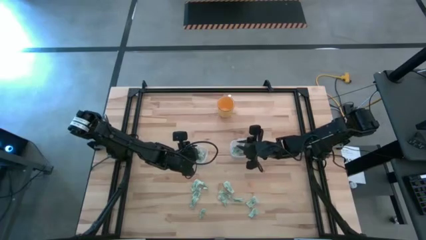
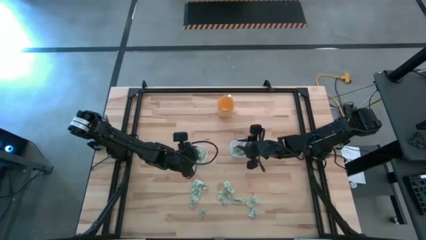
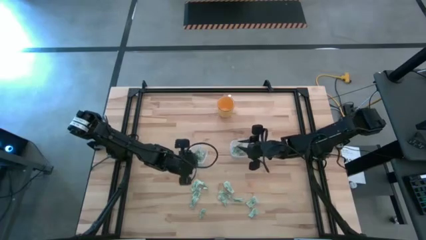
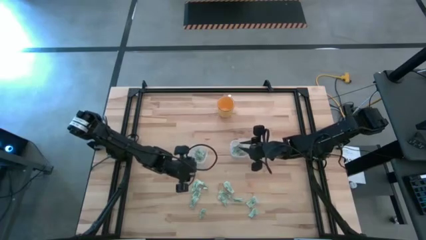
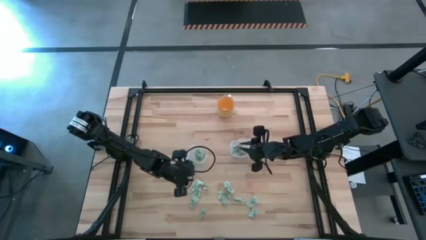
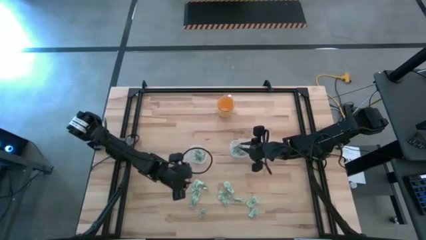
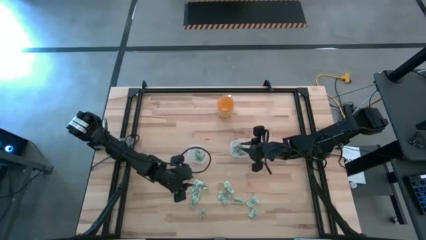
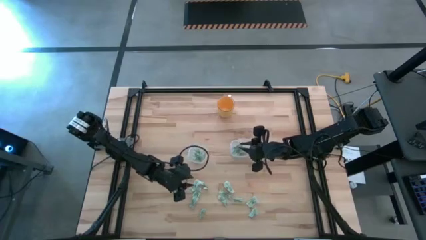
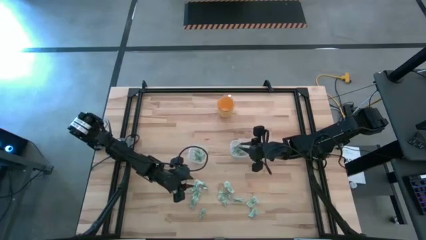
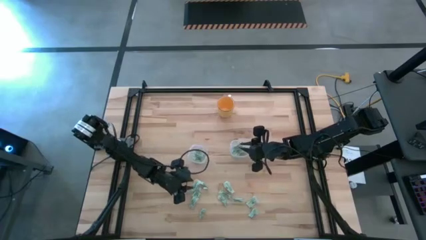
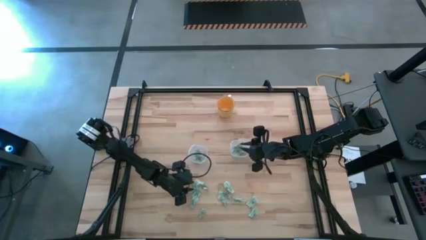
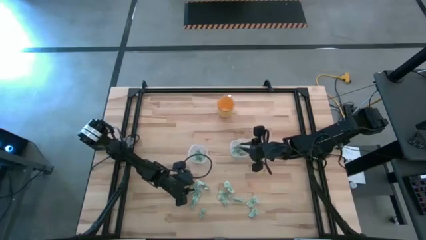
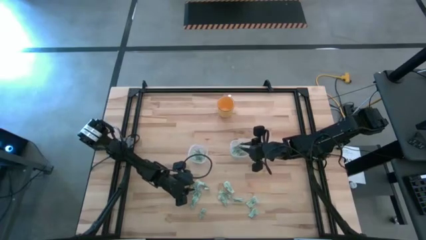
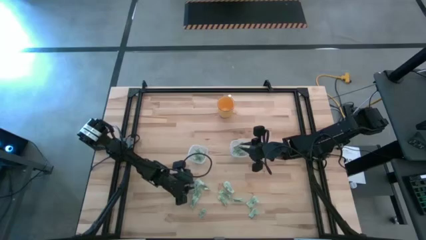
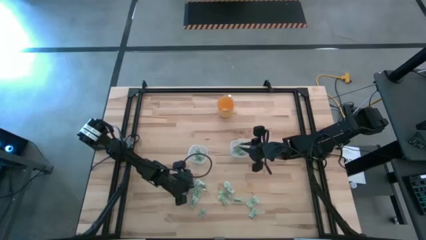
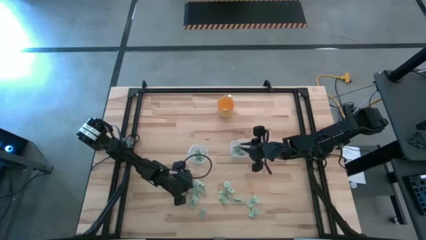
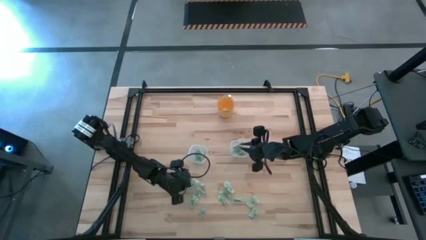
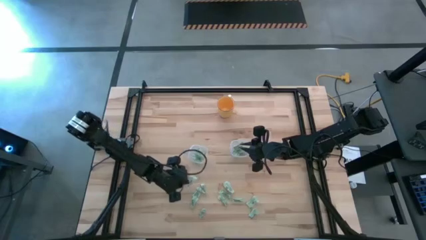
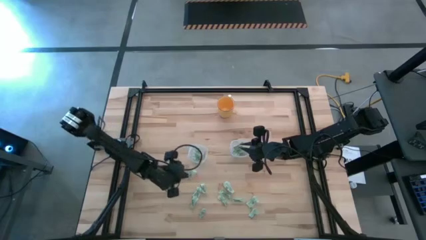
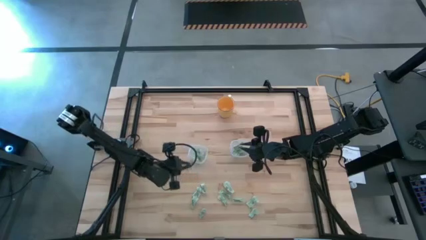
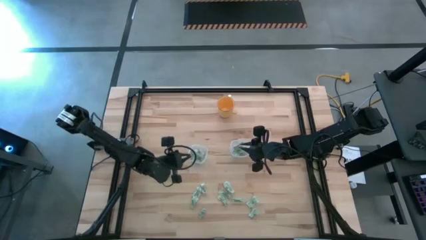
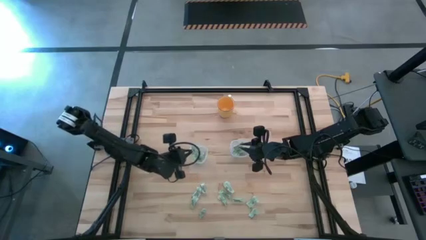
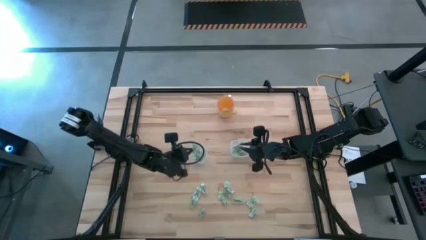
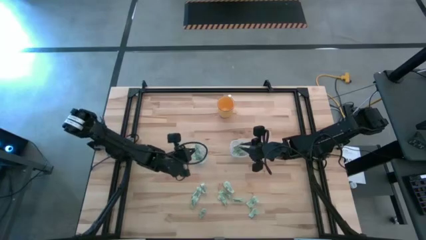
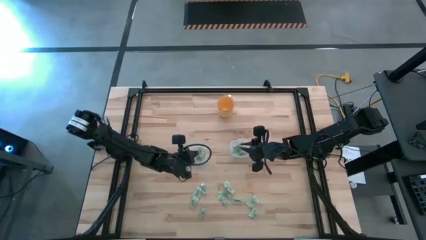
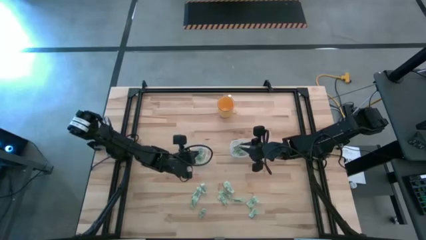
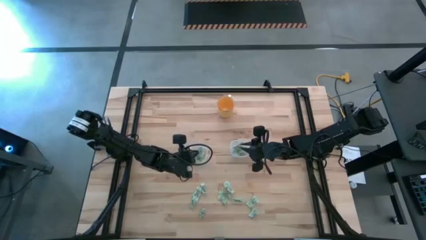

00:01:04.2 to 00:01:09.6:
Task: Pick and place items into bin
Put the green sweetener bag into the left transparent food container

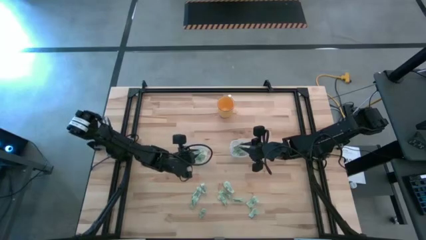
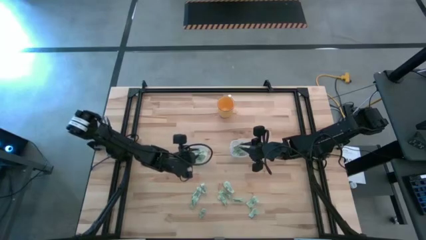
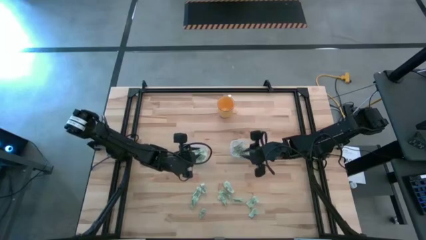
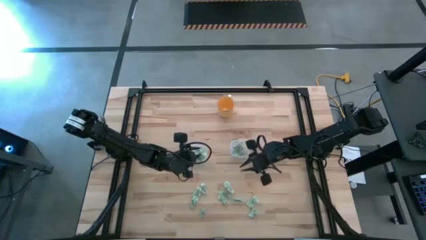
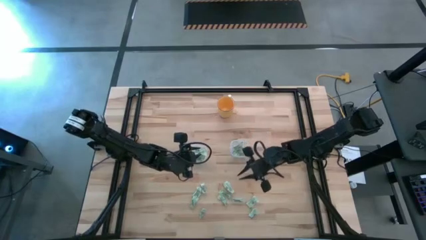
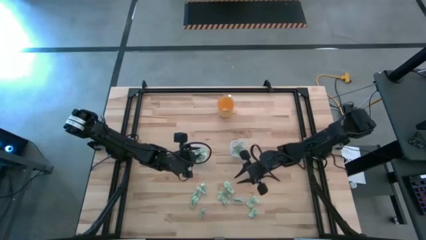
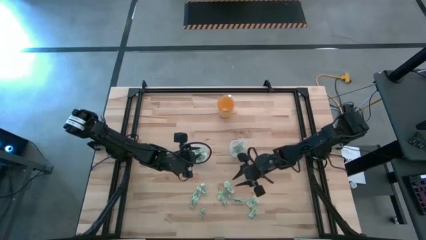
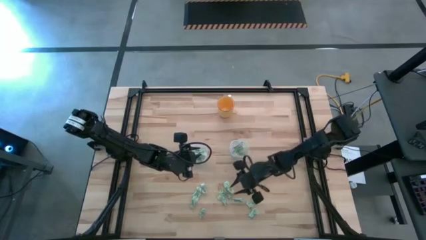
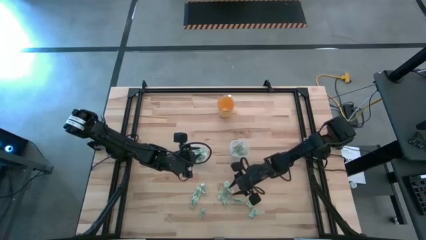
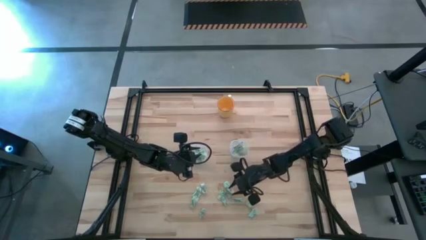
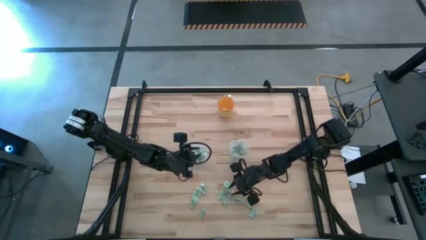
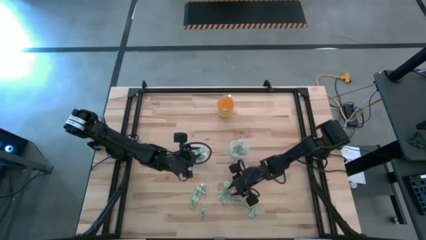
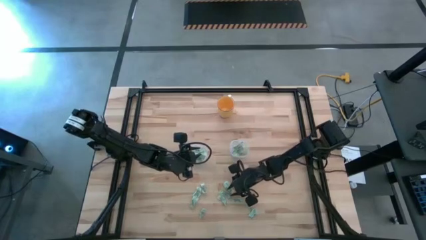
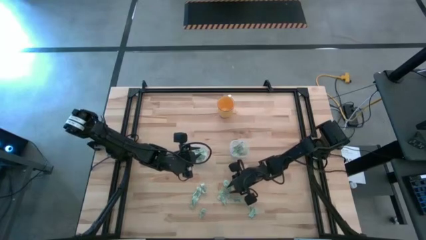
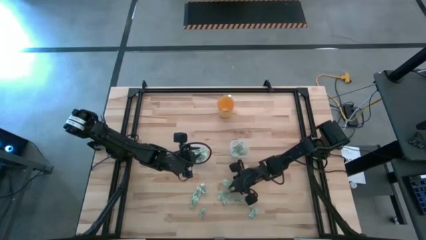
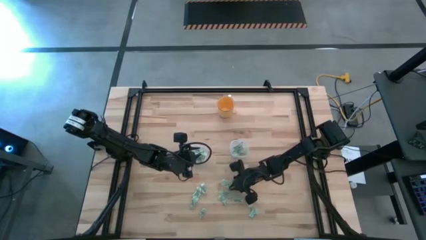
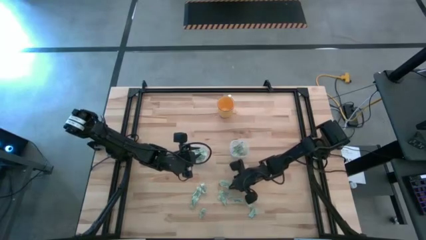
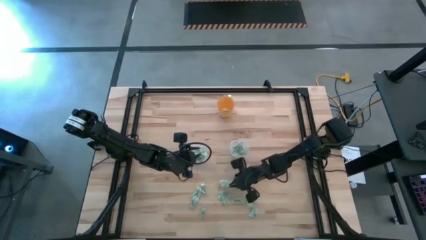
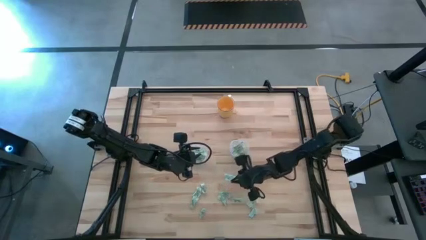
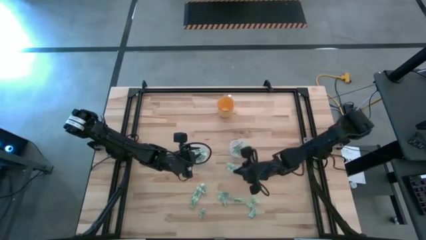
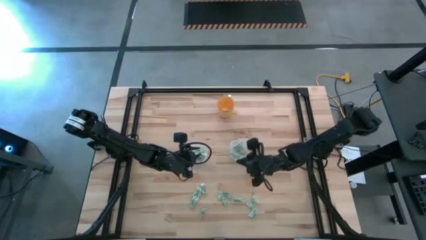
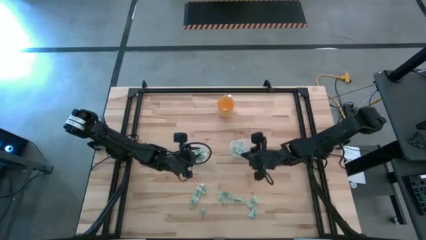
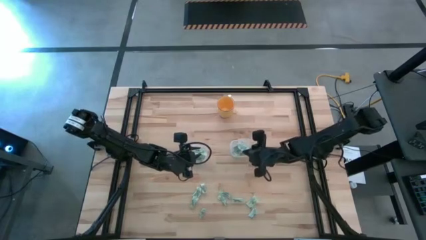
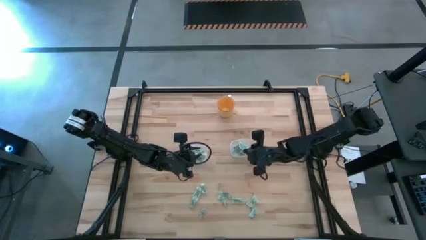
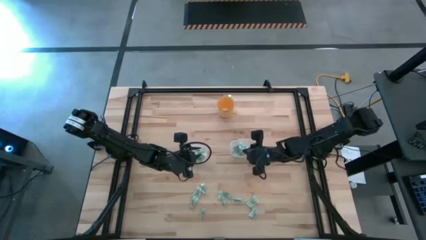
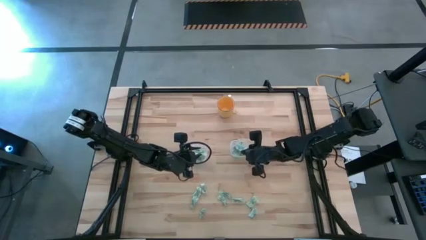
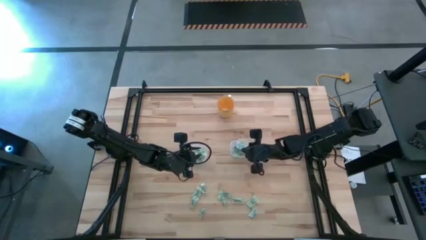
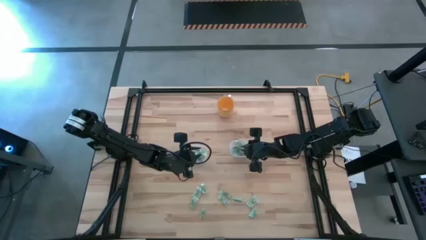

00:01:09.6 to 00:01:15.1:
Put the green sweetener bag into the right transparent food container

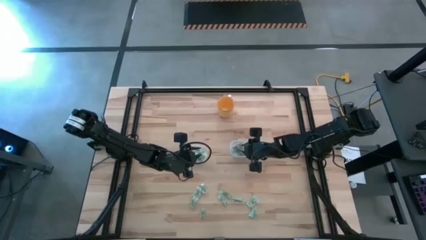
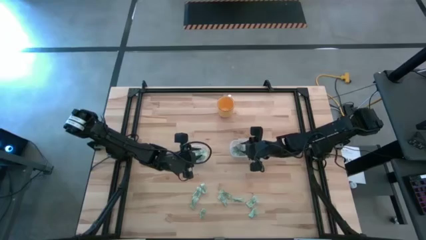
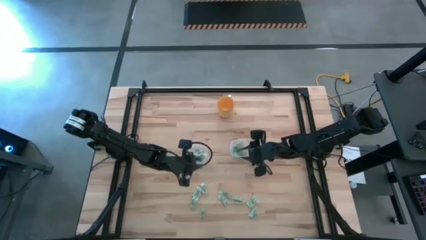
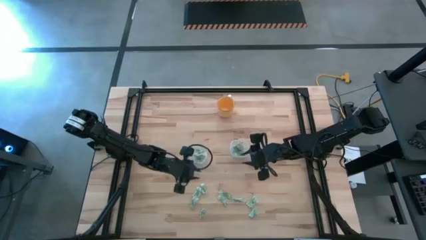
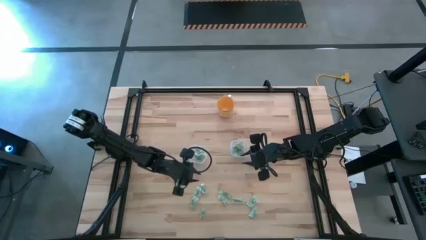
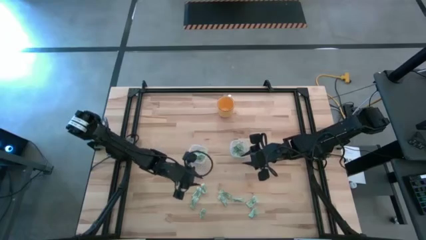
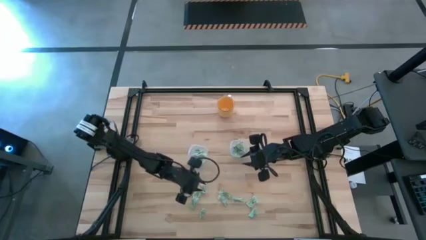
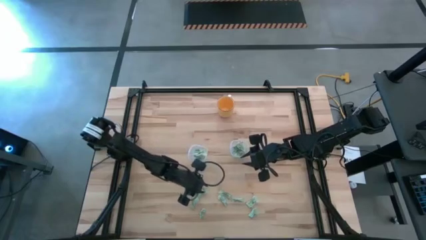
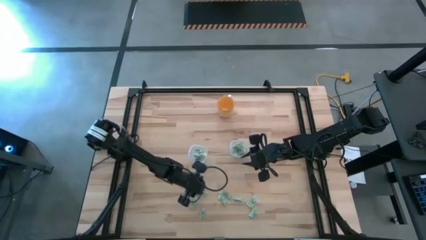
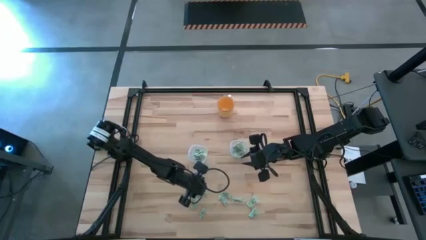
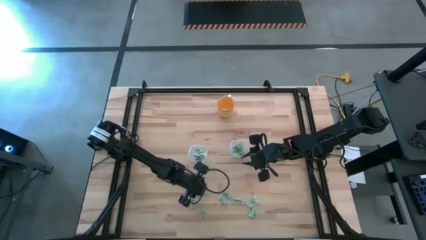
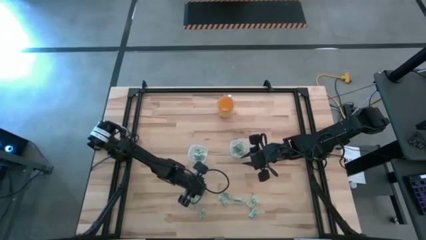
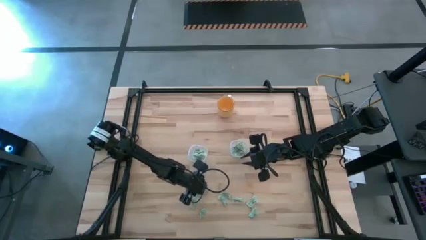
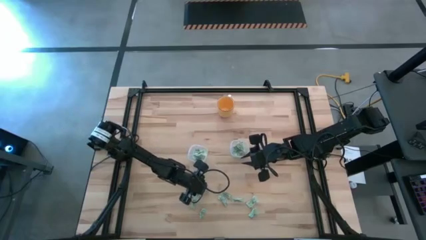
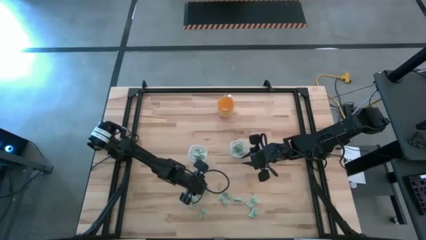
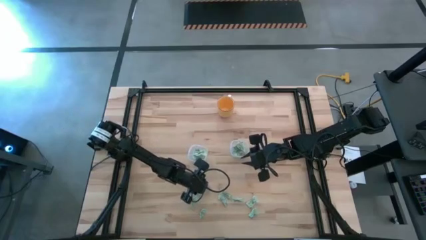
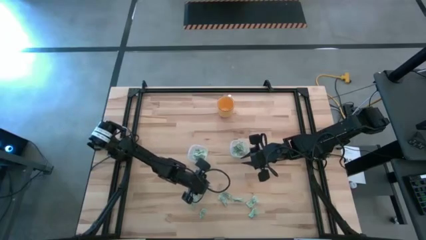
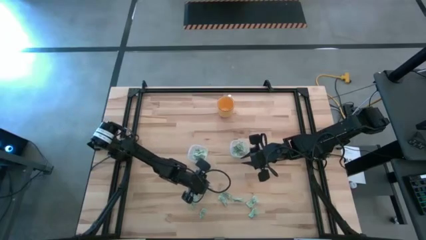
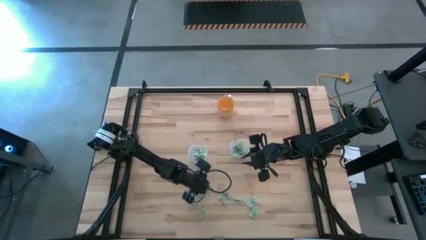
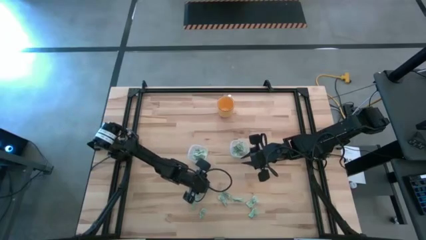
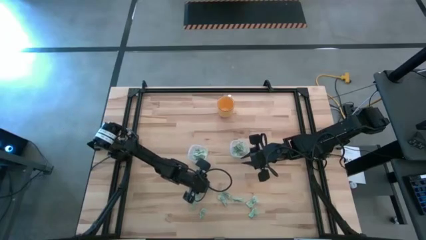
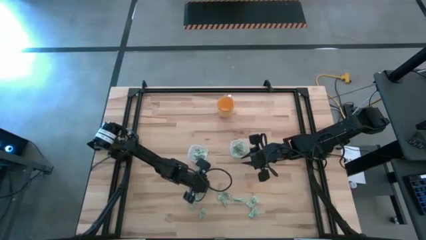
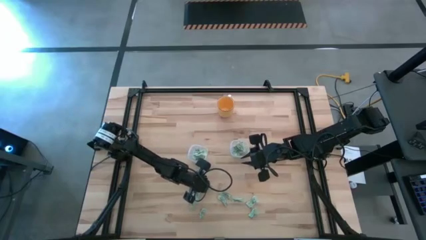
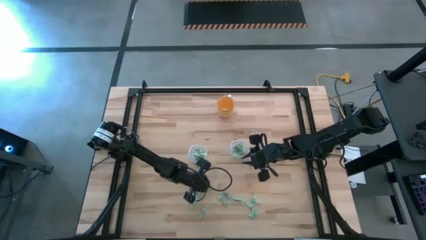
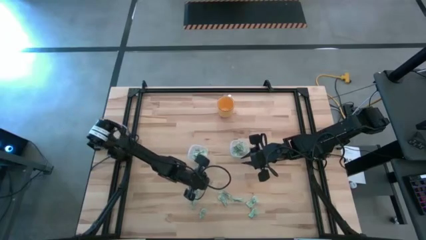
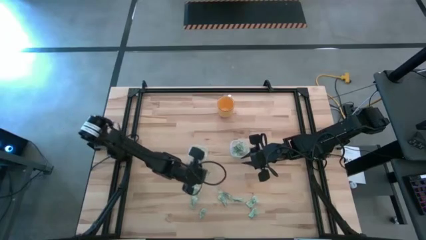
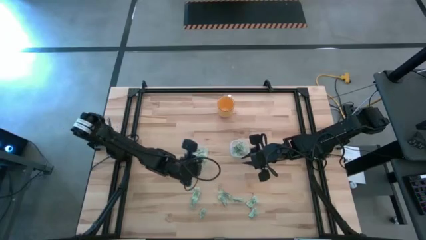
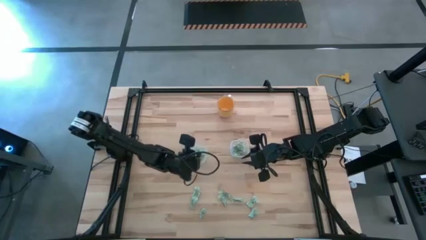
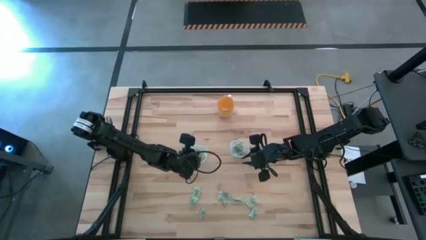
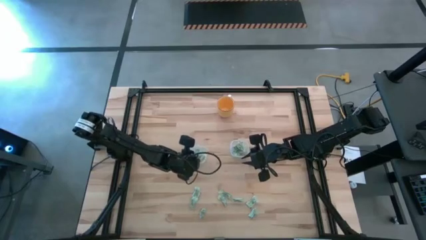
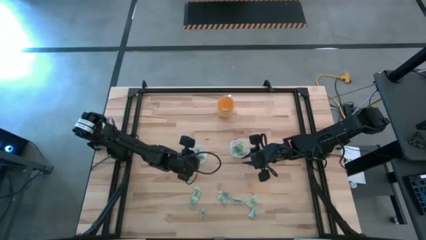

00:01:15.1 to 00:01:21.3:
Put the green sweetener bag into the left transparent food container
